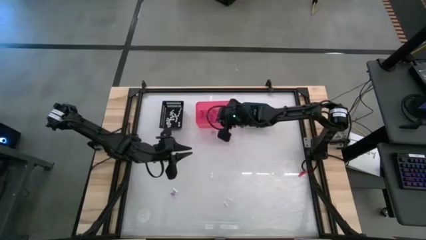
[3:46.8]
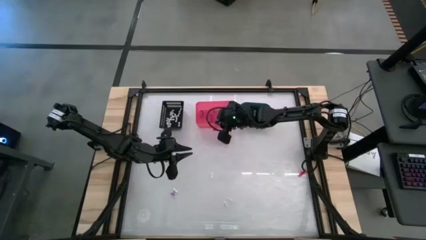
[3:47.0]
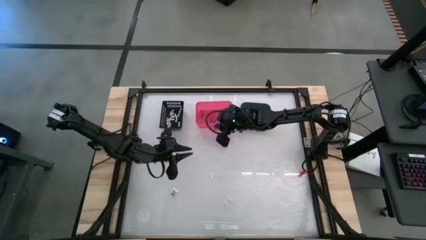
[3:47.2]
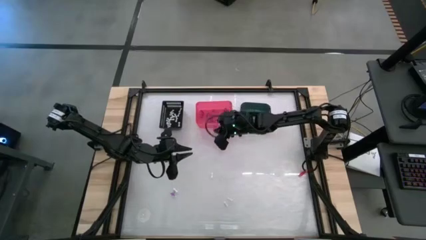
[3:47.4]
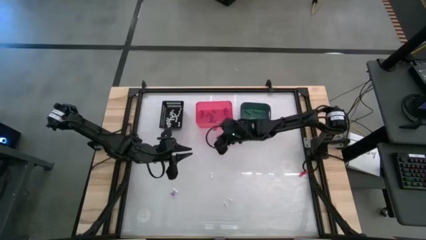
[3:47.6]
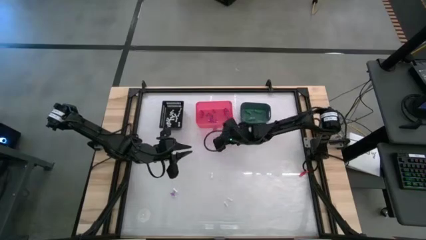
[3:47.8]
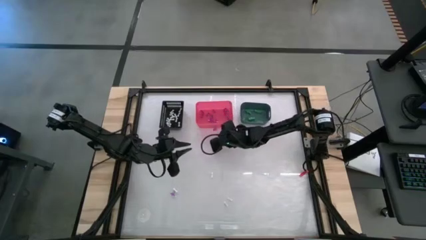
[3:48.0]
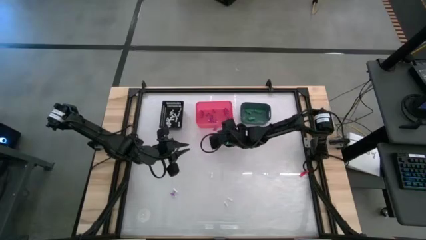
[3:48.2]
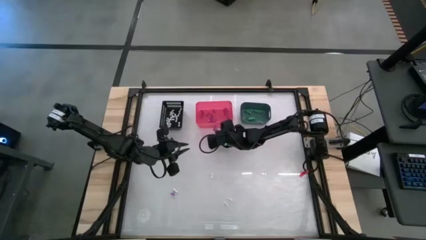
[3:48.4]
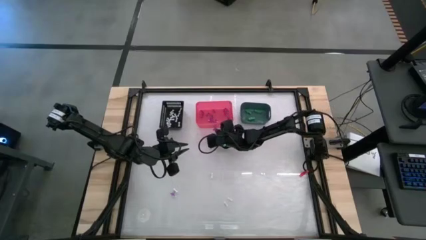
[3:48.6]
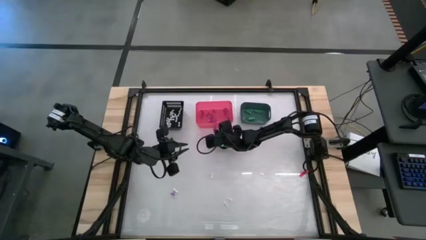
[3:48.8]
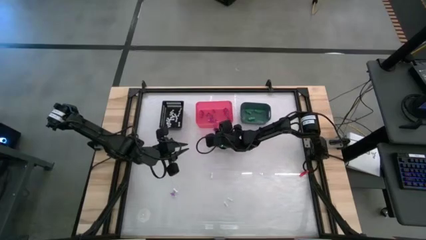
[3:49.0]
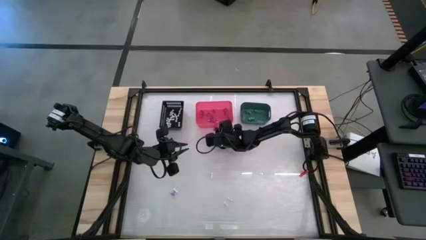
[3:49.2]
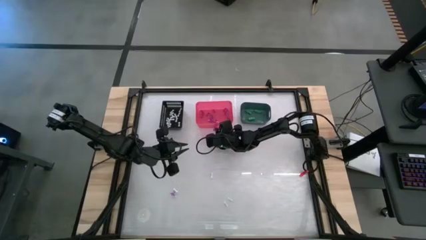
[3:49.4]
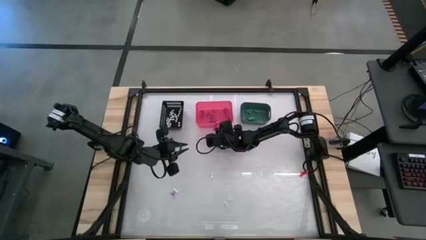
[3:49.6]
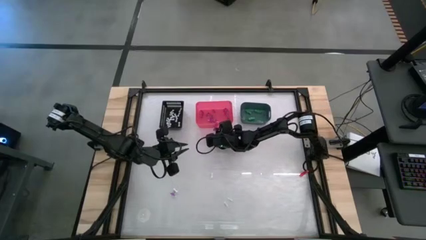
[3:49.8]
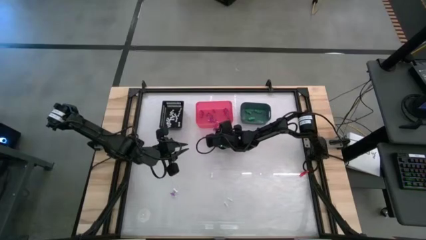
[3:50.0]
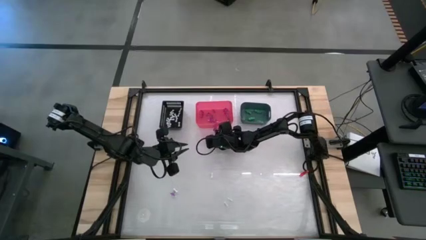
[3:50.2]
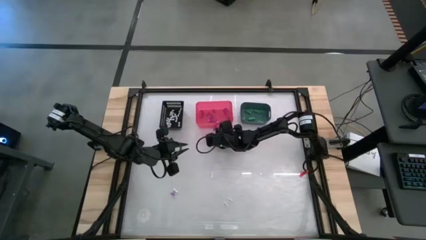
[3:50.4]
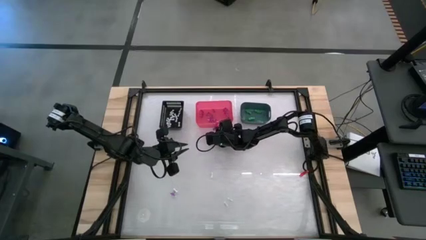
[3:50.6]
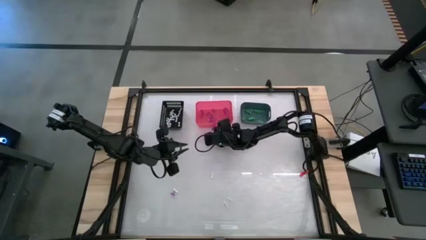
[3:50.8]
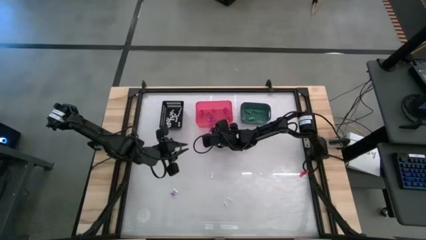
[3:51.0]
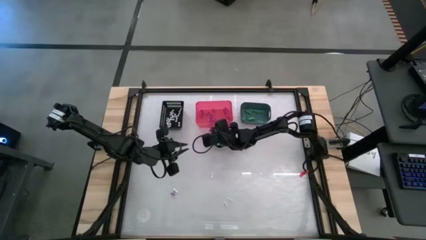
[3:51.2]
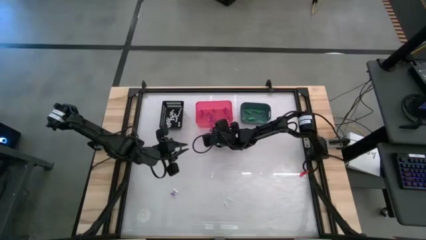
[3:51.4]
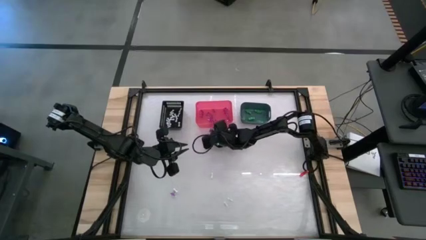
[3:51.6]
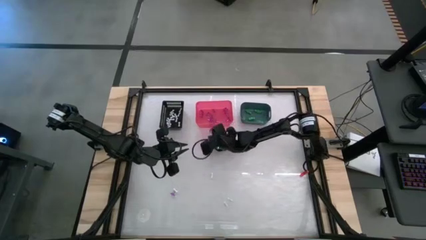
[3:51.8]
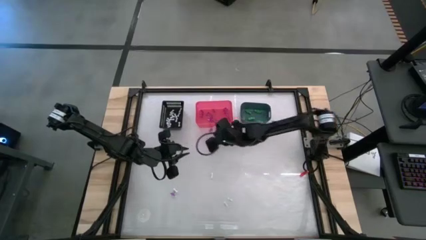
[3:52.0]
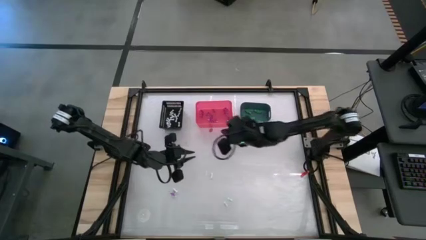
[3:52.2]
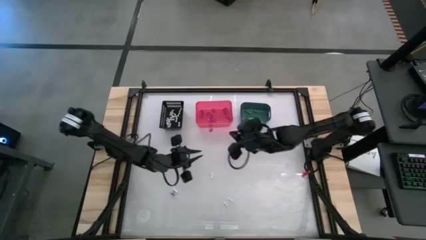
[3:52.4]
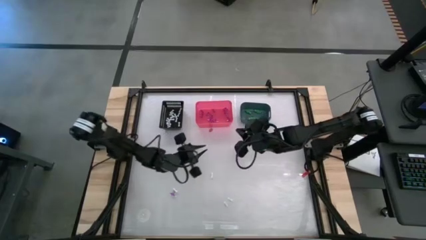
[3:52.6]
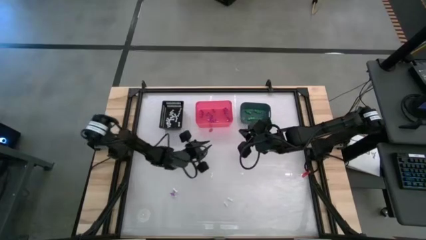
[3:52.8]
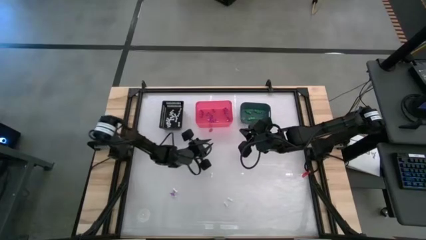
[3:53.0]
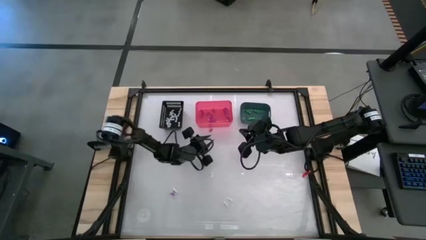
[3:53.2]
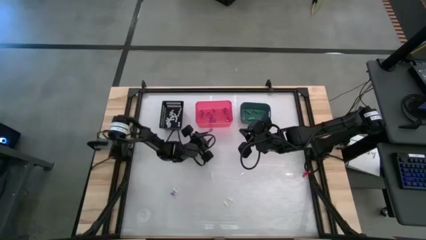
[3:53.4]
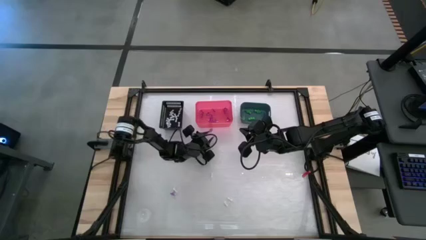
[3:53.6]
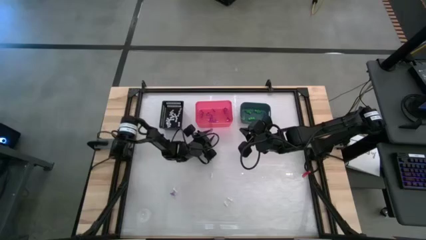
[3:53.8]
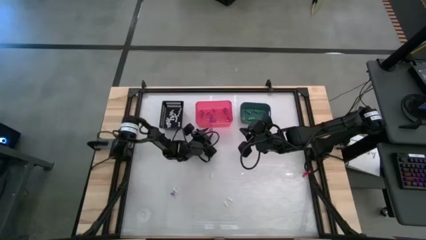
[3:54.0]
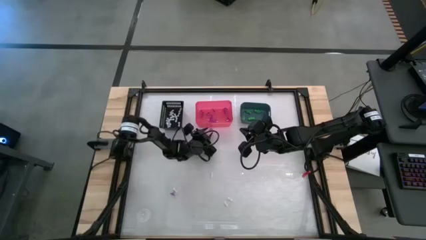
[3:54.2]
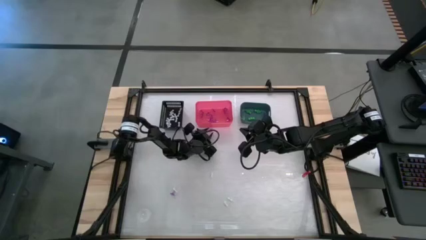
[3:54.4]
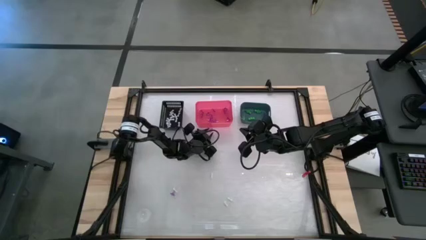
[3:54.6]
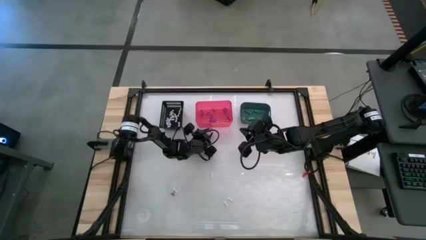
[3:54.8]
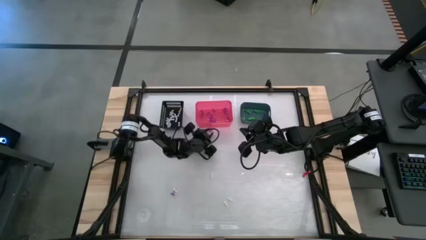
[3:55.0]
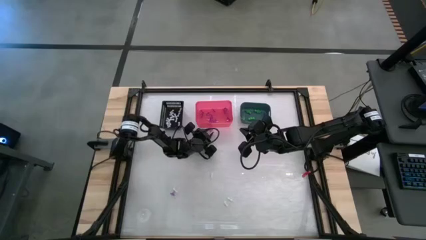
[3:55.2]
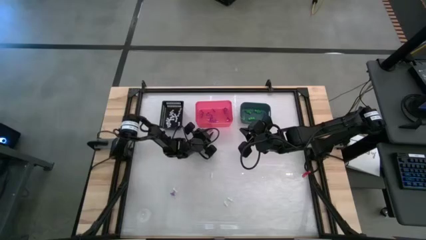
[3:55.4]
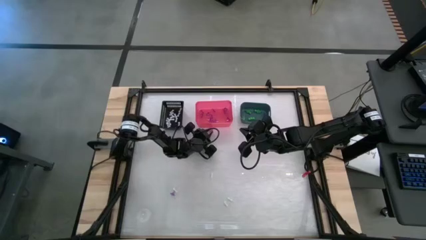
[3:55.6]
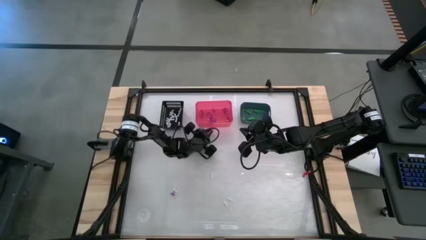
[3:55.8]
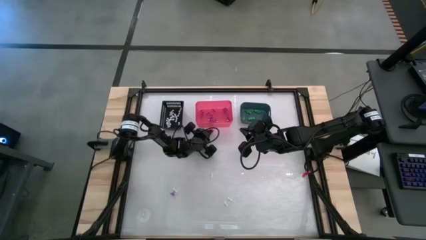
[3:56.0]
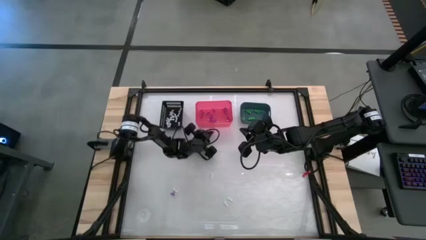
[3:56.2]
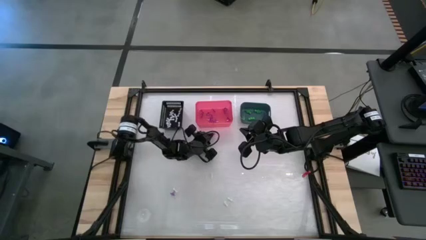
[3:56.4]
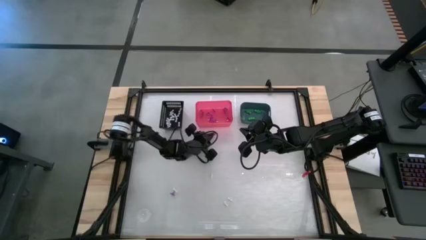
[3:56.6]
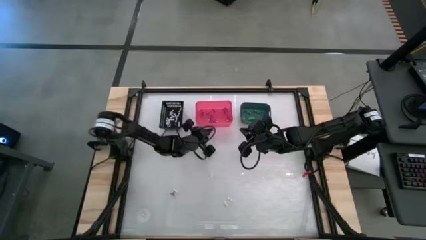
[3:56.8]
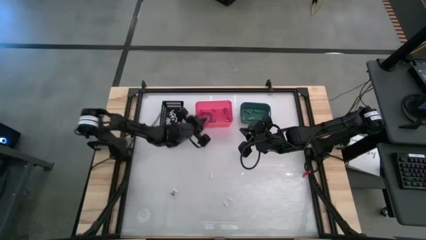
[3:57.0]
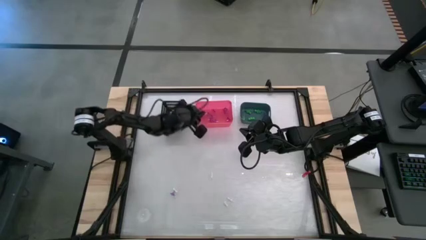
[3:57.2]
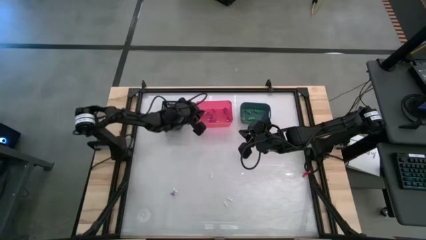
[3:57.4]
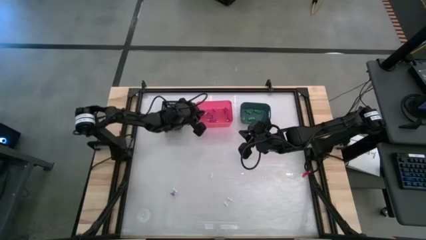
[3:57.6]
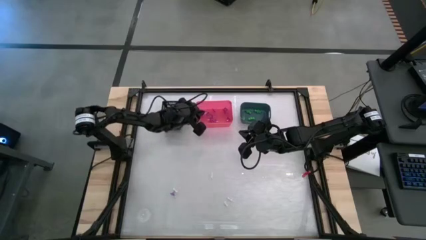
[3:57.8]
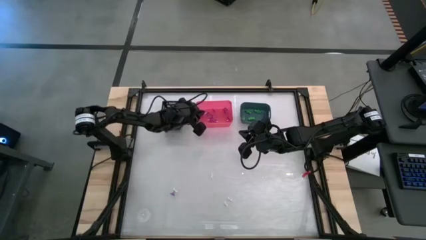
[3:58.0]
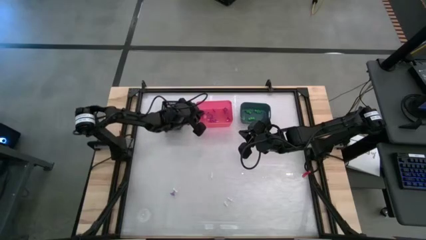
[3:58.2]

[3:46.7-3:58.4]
Task: Sort Halloween decoration
Put the purple hat toy into the pink bin

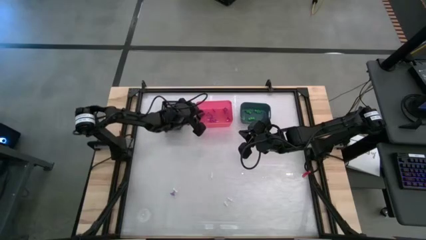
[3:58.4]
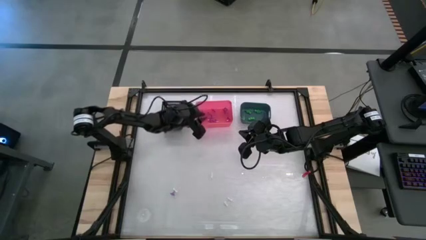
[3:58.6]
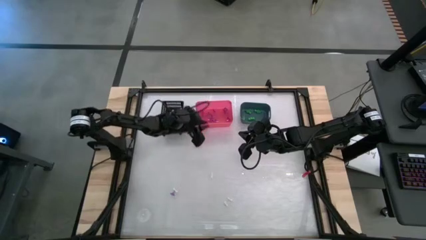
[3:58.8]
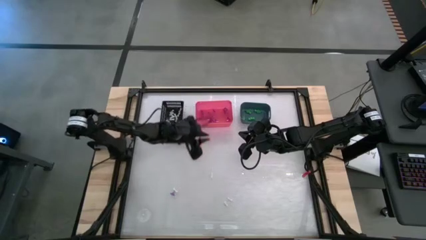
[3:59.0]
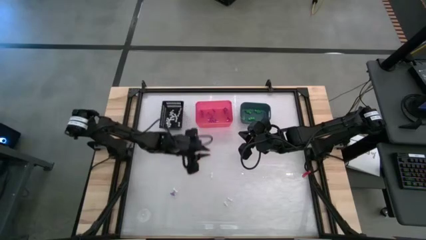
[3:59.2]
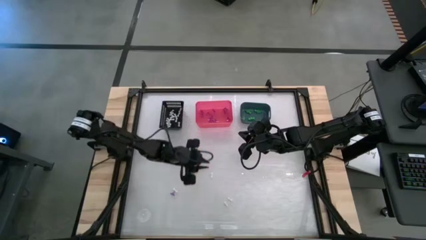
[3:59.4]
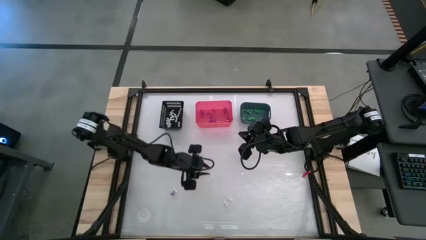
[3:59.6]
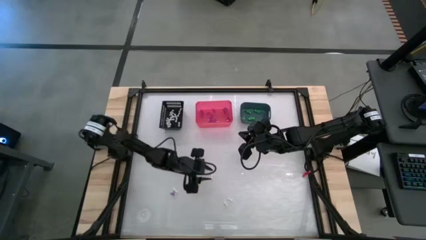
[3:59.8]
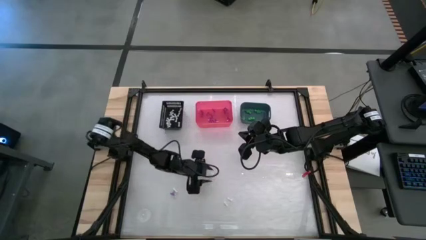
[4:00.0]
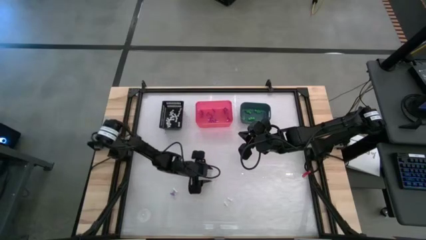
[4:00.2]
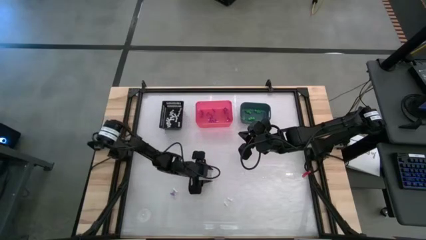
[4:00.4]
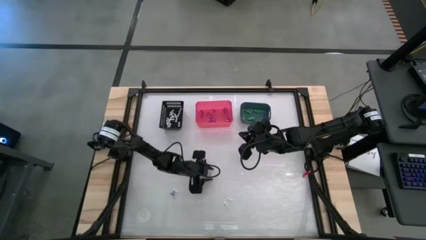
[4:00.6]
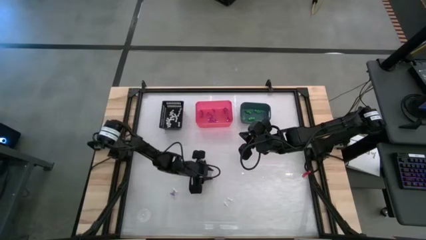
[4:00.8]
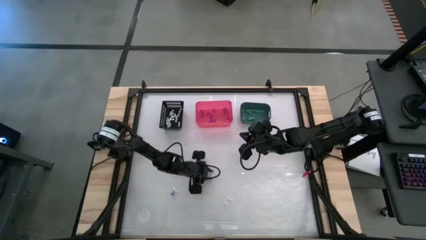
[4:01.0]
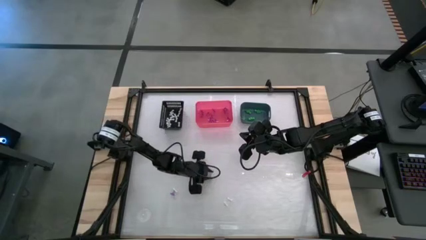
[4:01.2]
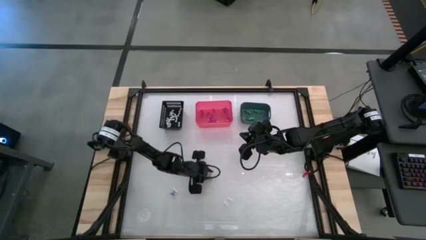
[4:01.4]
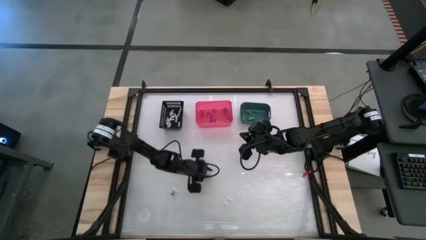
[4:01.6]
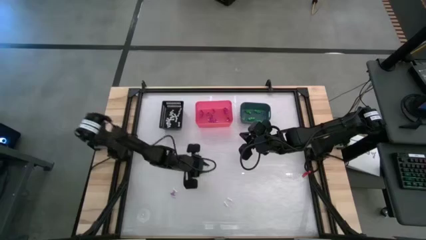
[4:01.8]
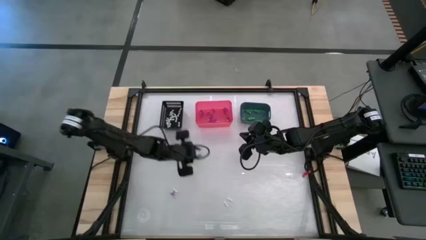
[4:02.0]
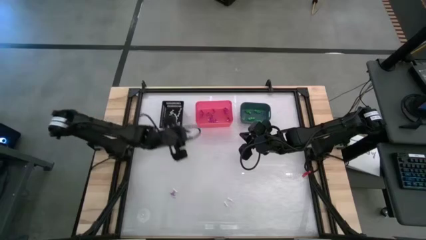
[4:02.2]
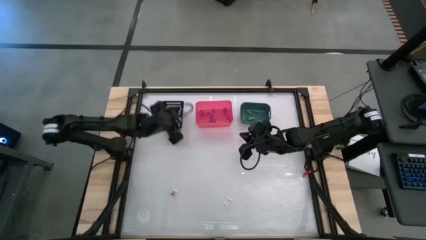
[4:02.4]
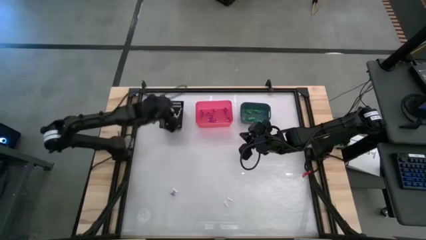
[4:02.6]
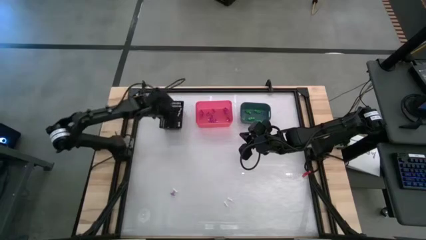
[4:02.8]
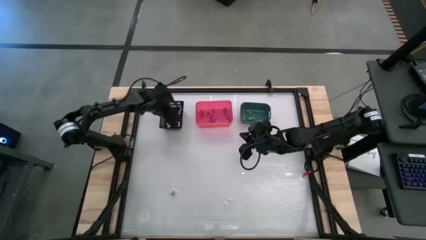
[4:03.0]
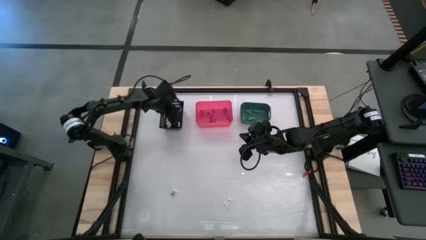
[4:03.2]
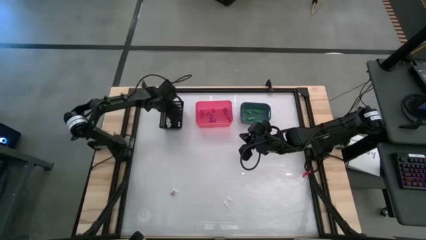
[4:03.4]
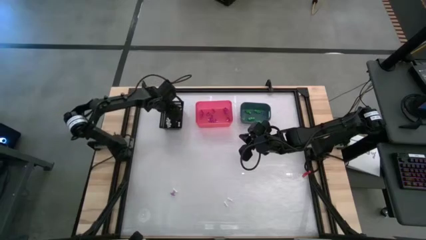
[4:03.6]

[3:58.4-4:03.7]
Put the white bone toy into the black bin
